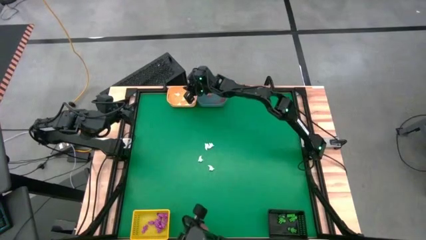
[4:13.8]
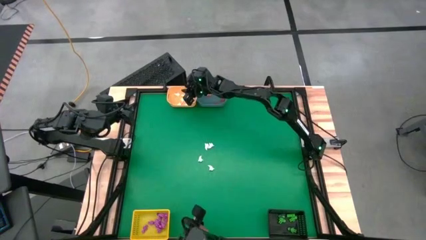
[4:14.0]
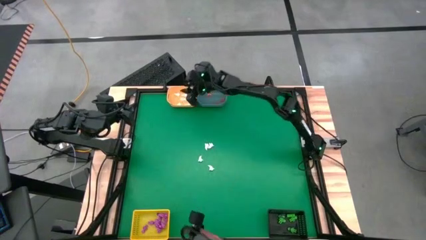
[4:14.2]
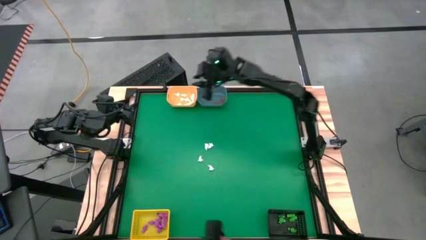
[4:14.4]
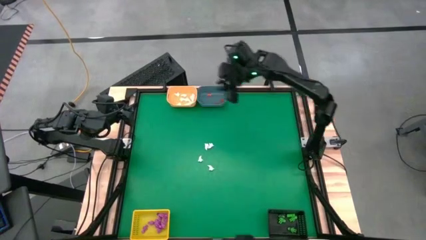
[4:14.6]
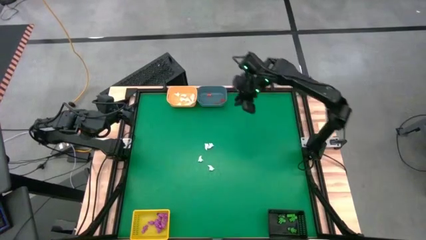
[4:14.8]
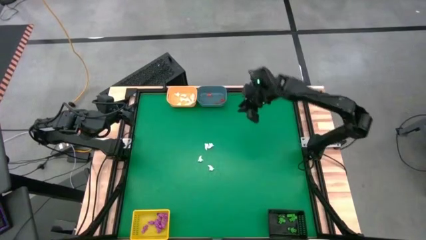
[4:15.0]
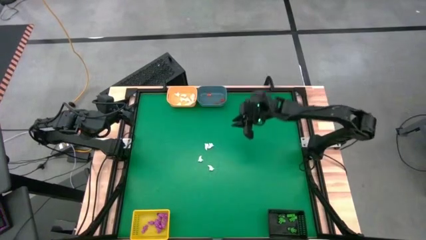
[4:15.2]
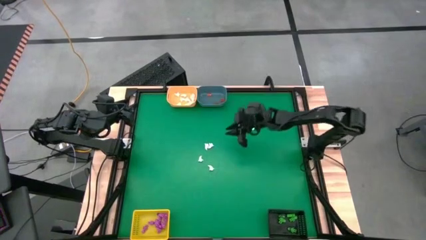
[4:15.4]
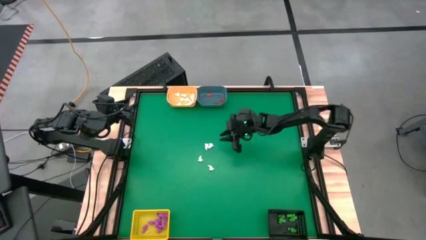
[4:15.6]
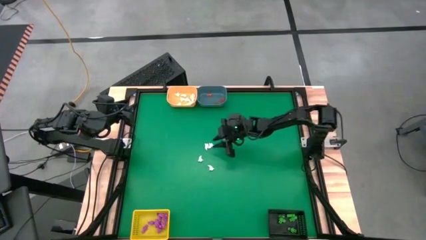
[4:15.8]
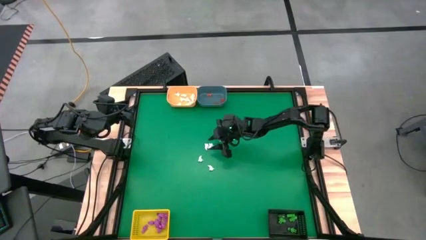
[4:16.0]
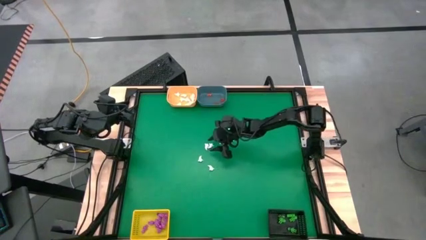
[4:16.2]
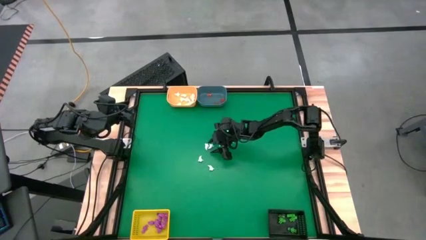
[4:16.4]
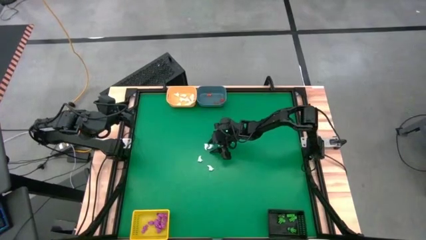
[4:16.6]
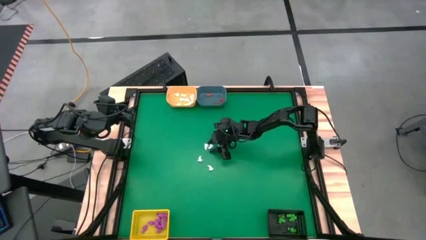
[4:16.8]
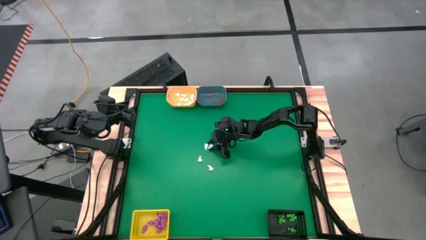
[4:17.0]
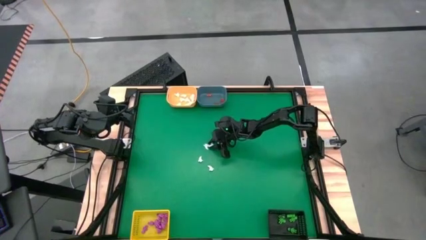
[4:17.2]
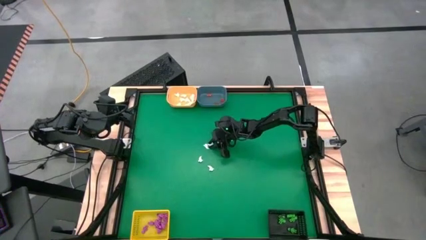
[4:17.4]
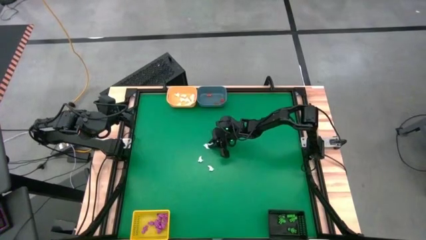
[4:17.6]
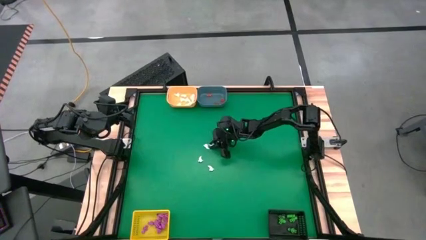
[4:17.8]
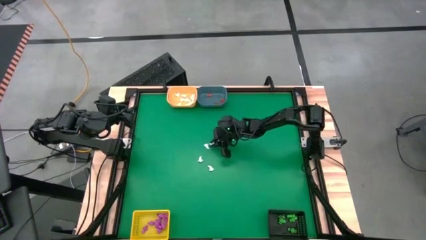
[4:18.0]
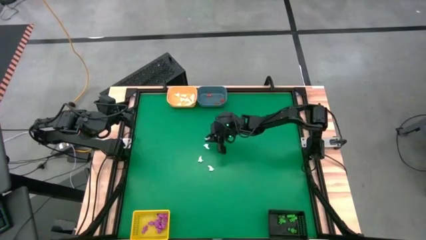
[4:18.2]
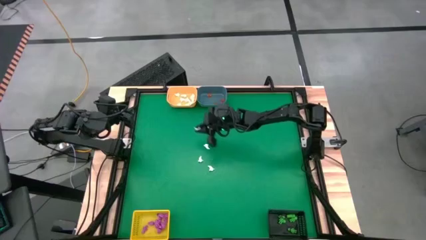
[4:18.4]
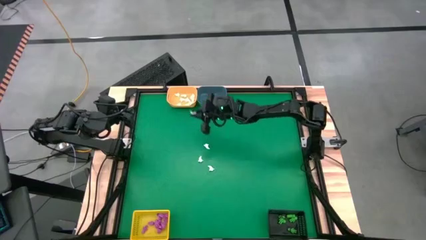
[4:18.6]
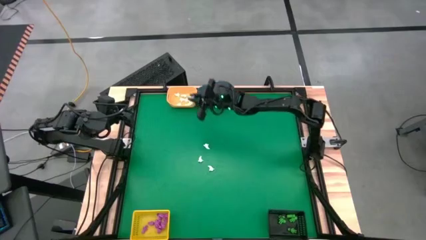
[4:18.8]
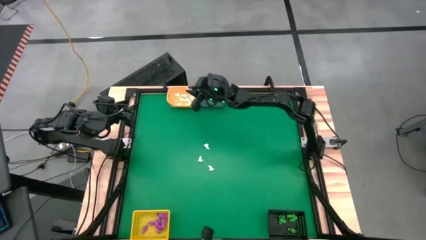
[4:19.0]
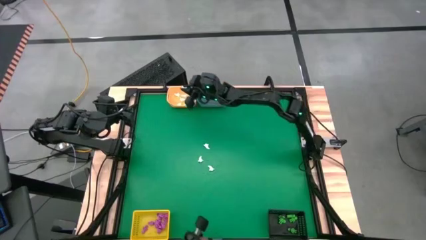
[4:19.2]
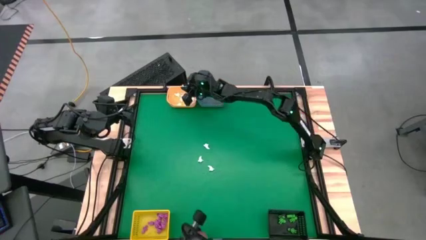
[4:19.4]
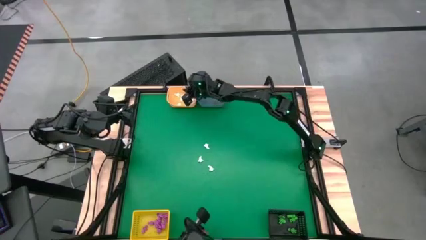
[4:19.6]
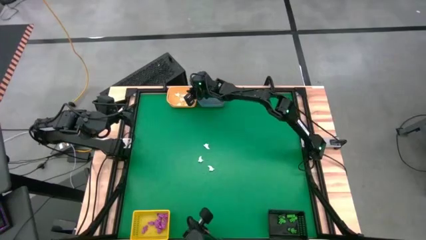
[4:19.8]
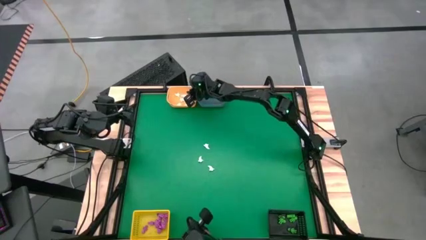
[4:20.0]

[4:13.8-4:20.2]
Task: Sort Halloween decoration
Put the white ghost into the orange bin

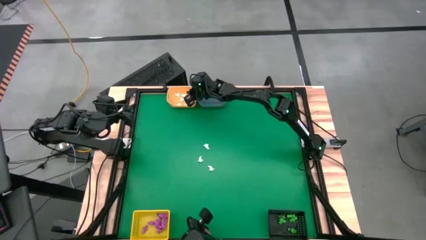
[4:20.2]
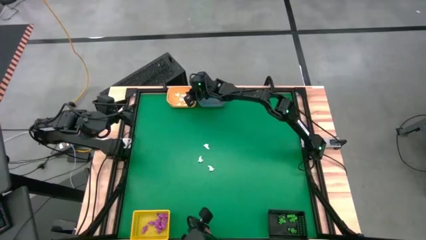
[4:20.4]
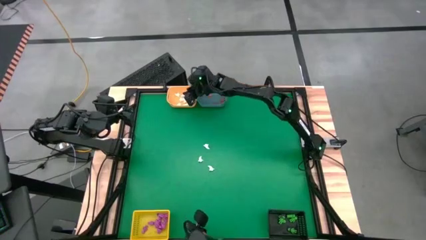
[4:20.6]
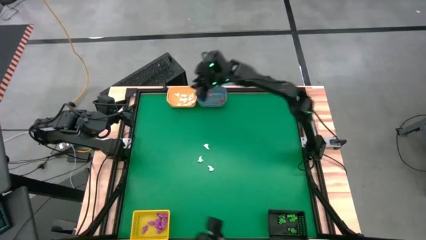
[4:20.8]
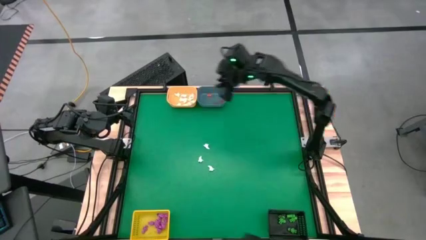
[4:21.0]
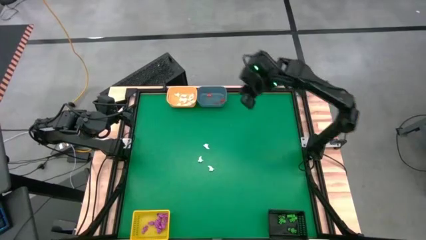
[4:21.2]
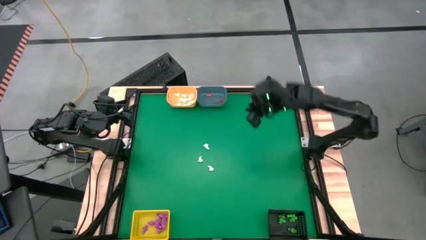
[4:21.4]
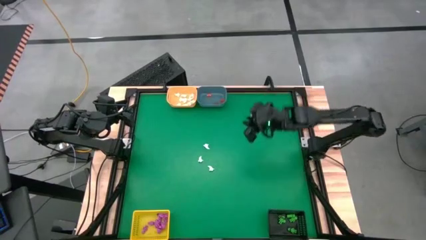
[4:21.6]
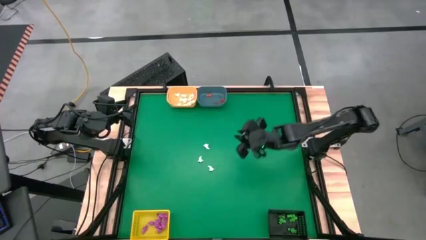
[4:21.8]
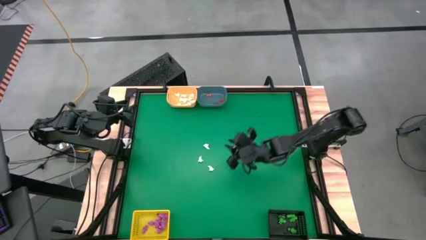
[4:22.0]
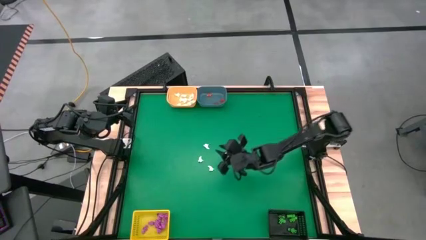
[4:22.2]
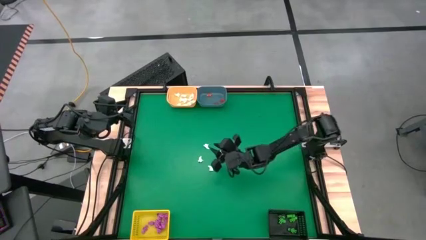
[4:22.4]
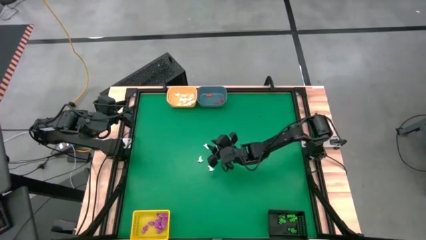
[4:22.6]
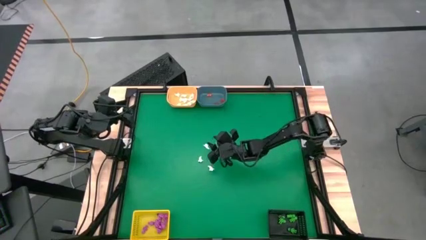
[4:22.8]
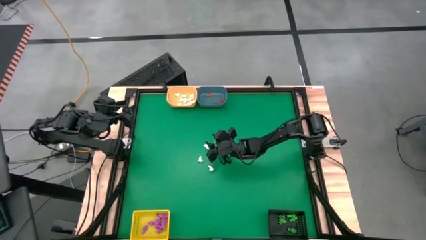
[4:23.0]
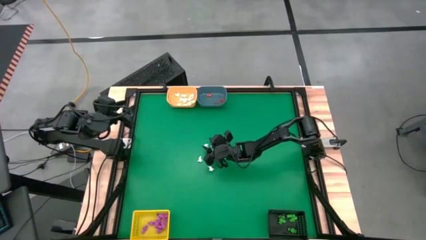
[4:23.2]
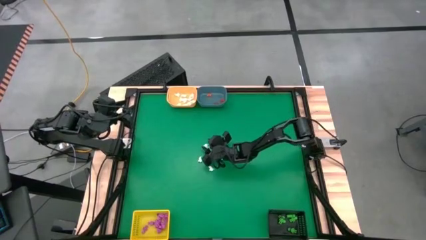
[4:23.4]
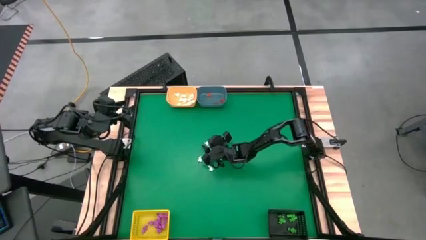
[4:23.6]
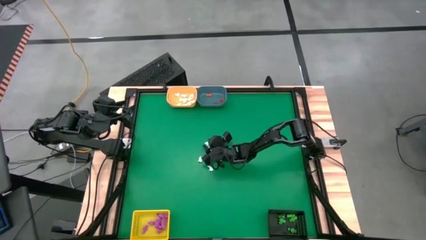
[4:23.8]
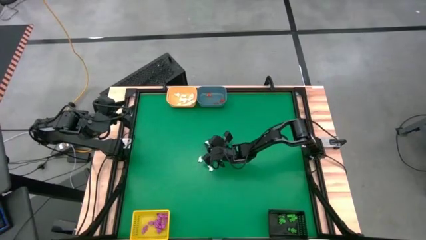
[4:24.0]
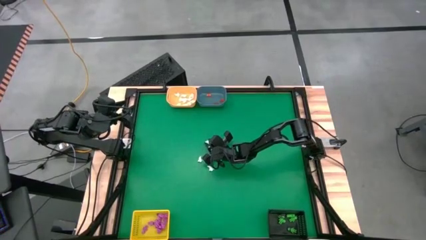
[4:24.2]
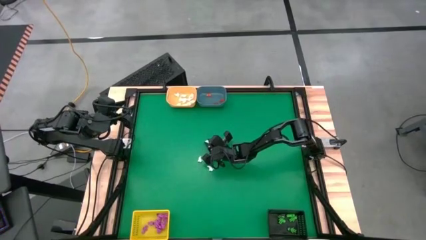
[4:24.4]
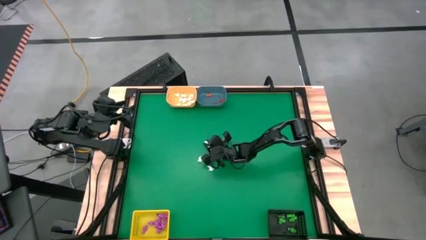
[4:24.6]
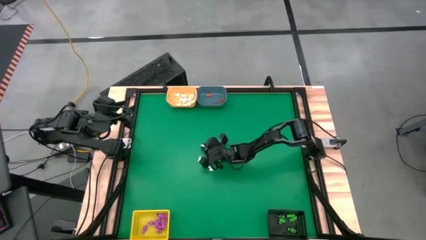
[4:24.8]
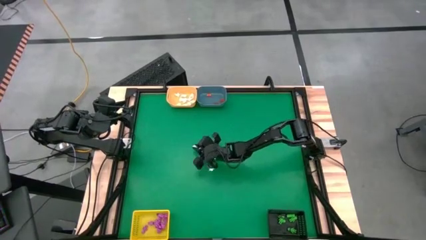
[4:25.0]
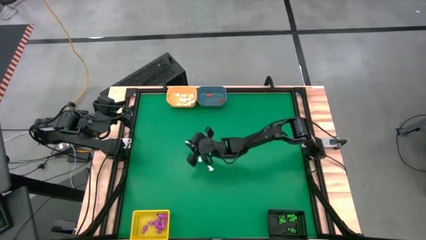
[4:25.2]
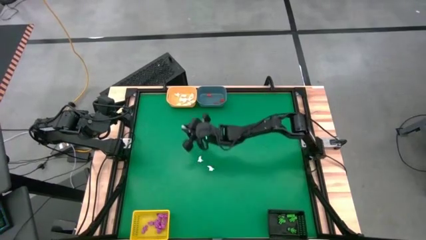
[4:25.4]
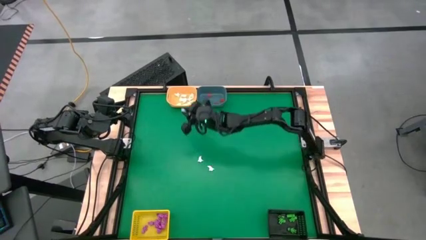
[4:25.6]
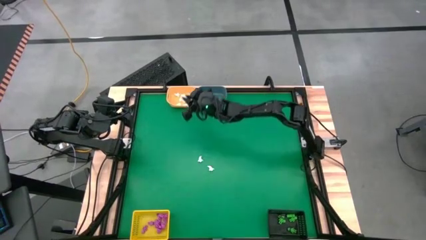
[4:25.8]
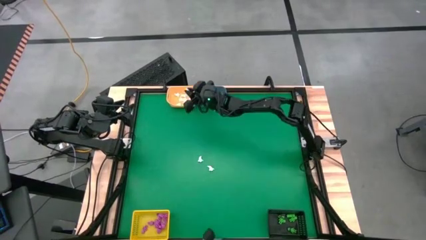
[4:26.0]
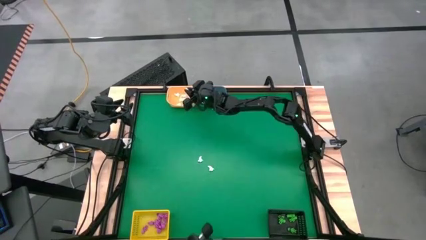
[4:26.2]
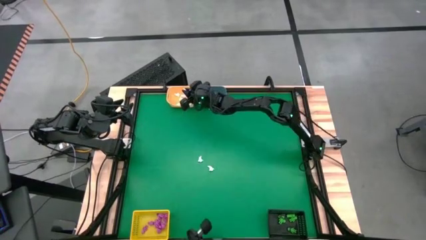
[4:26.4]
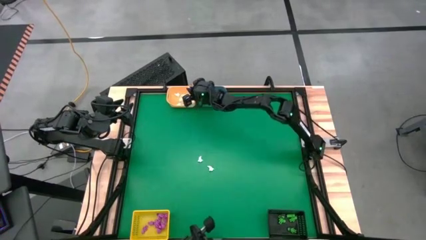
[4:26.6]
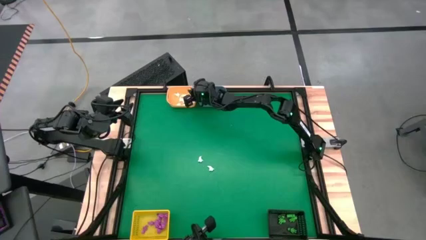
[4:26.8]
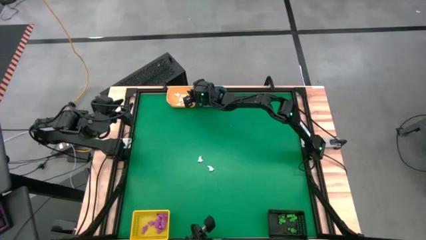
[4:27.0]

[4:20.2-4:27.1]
Put the white ghost into the orange bin
